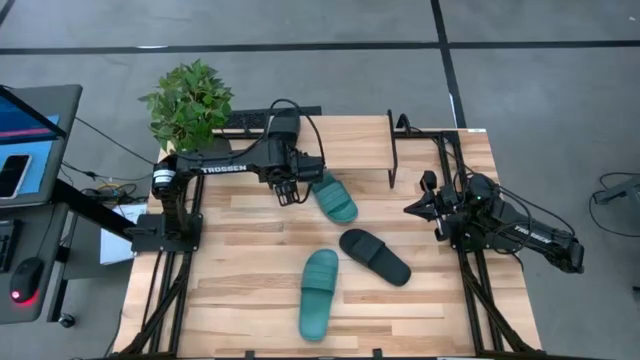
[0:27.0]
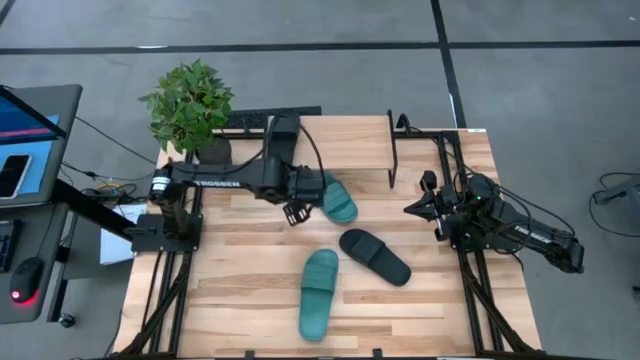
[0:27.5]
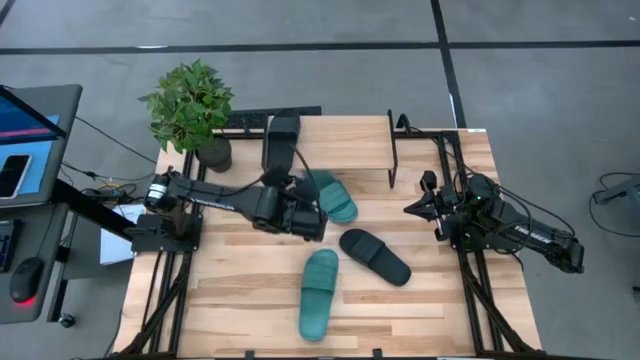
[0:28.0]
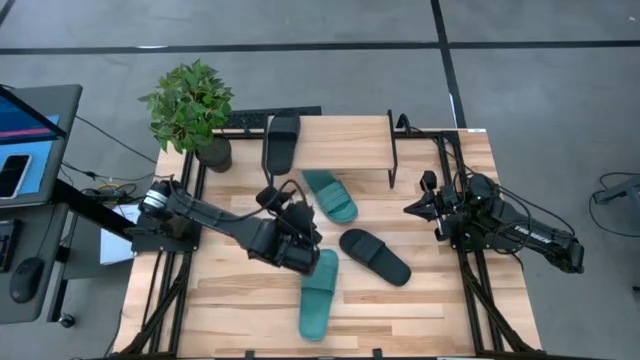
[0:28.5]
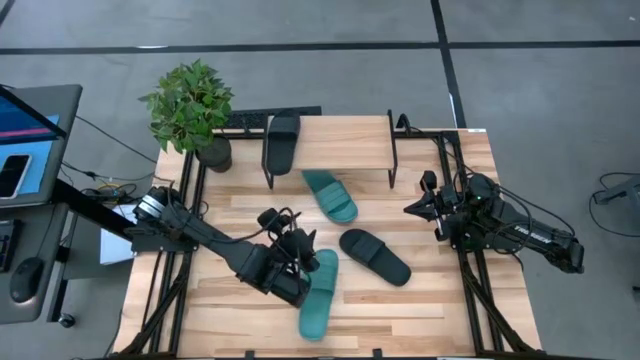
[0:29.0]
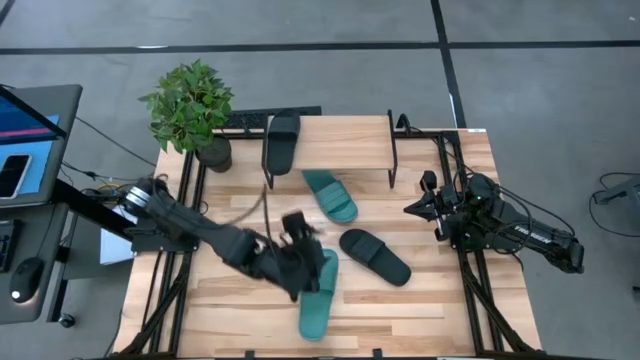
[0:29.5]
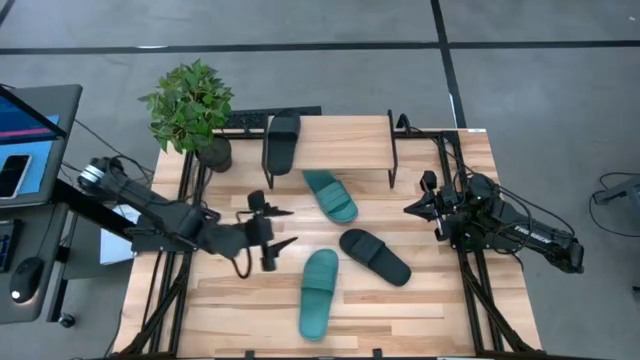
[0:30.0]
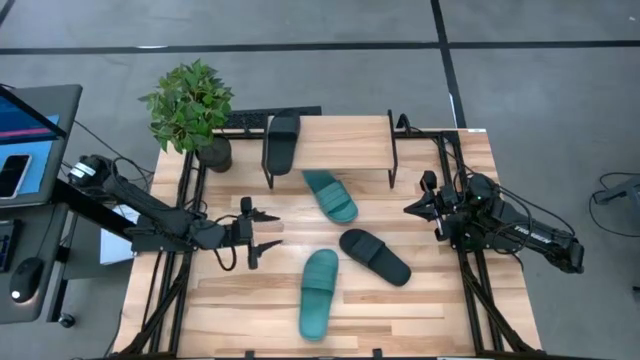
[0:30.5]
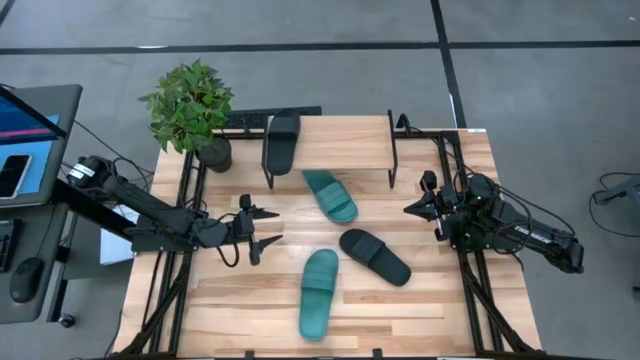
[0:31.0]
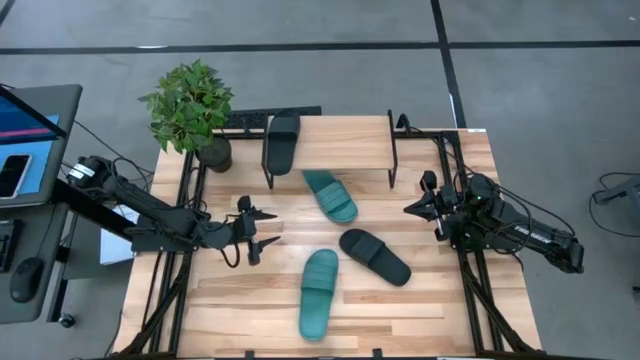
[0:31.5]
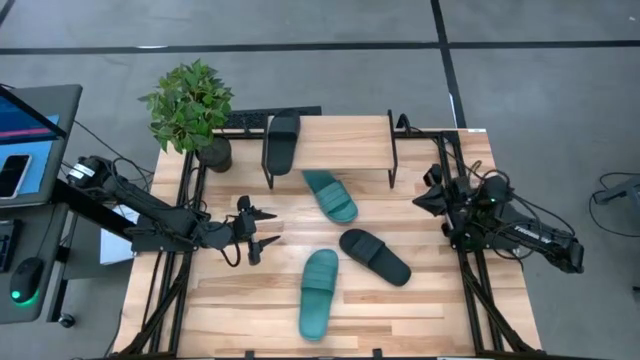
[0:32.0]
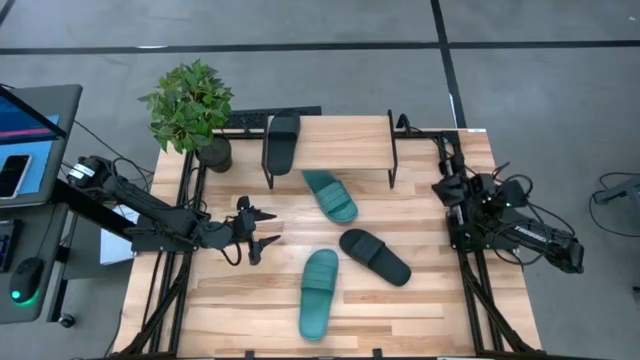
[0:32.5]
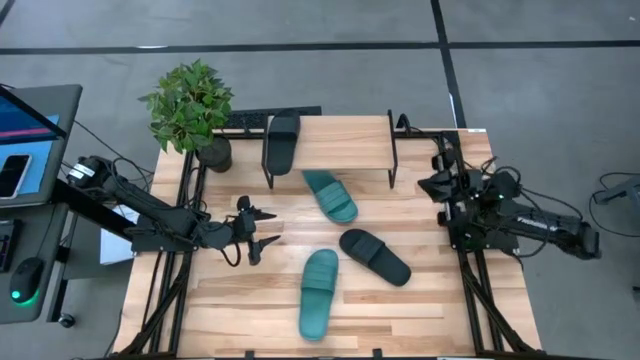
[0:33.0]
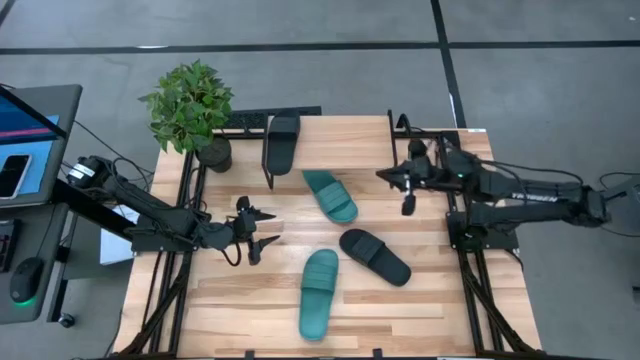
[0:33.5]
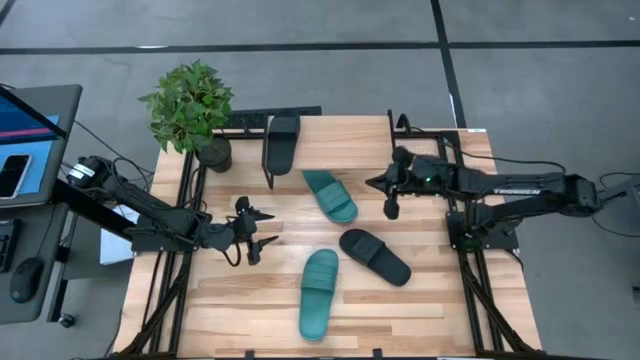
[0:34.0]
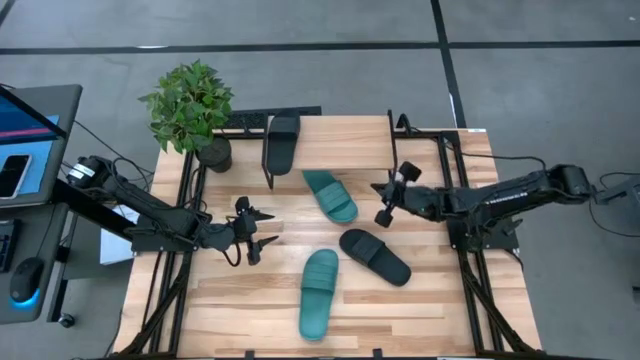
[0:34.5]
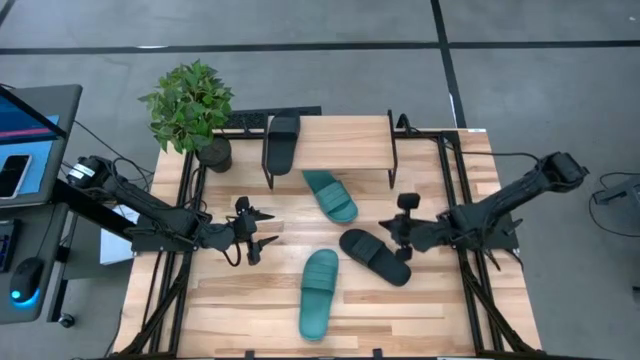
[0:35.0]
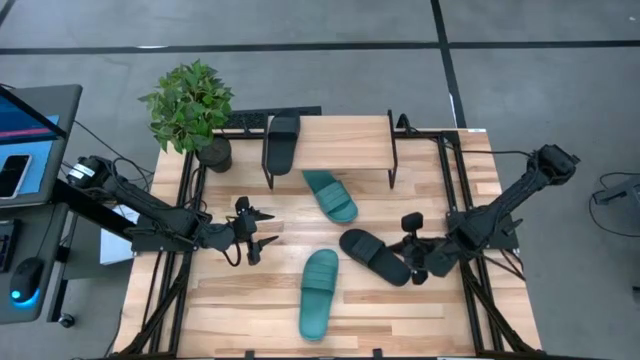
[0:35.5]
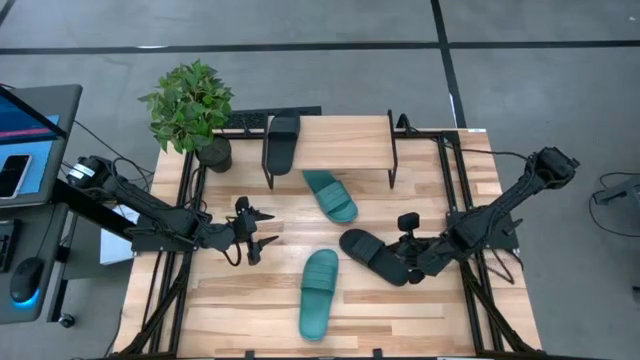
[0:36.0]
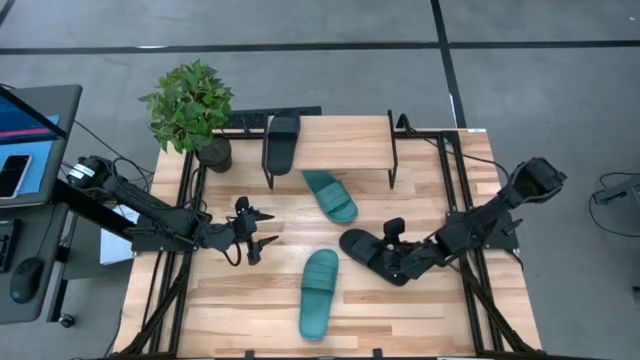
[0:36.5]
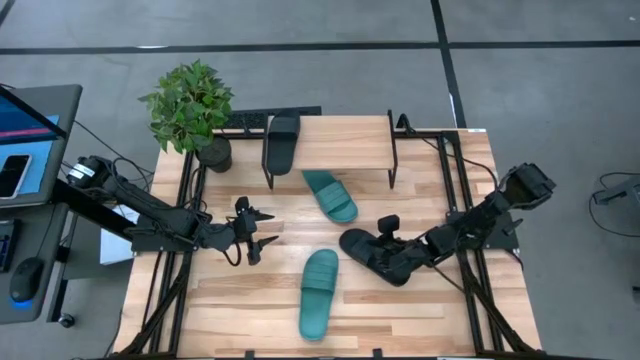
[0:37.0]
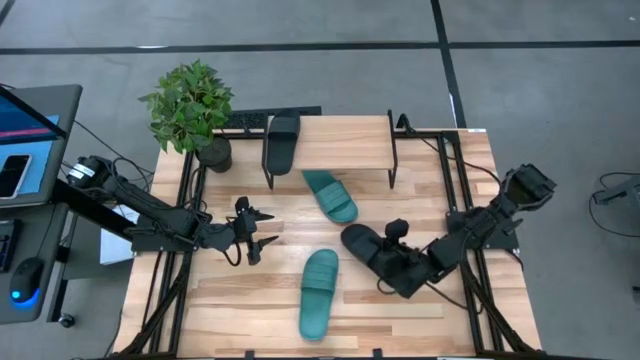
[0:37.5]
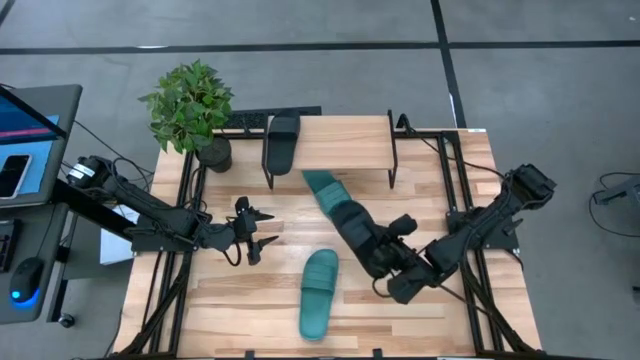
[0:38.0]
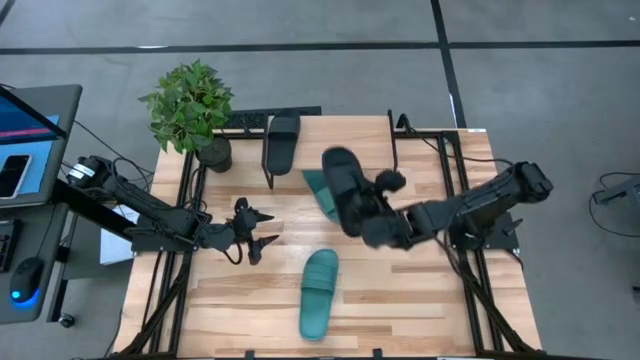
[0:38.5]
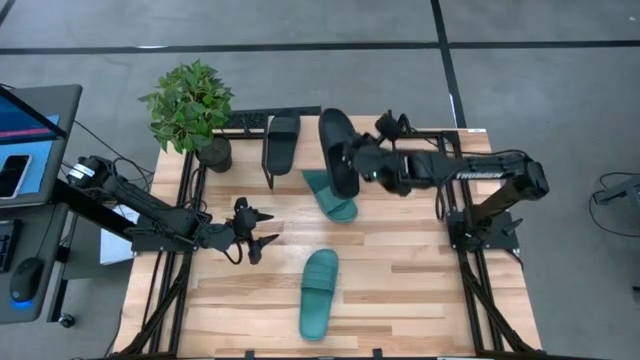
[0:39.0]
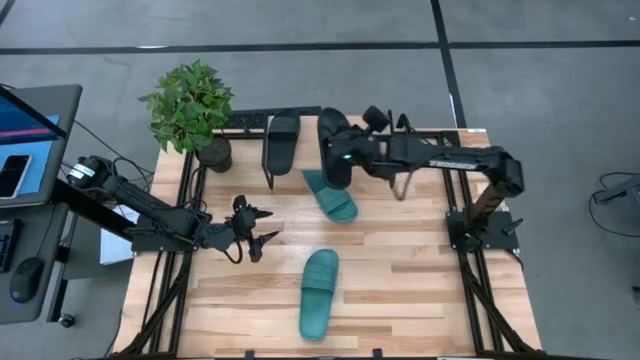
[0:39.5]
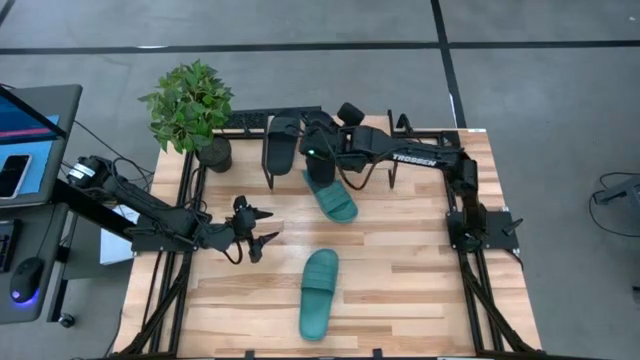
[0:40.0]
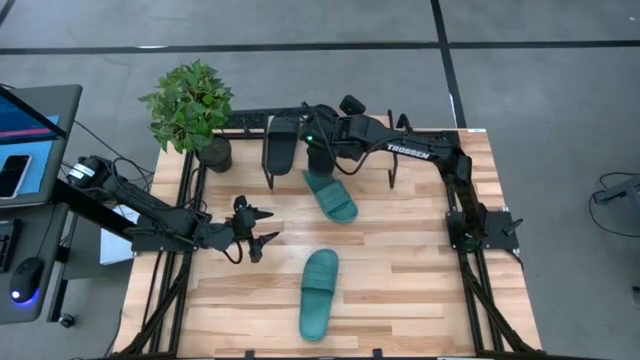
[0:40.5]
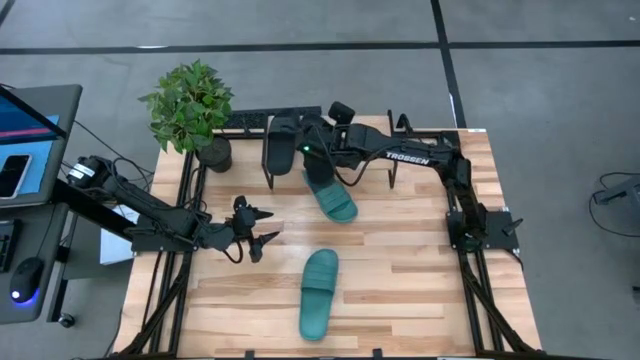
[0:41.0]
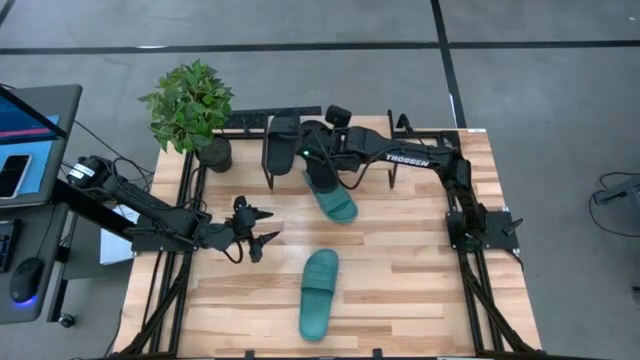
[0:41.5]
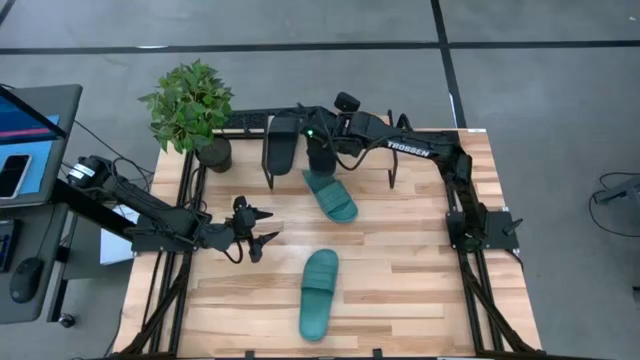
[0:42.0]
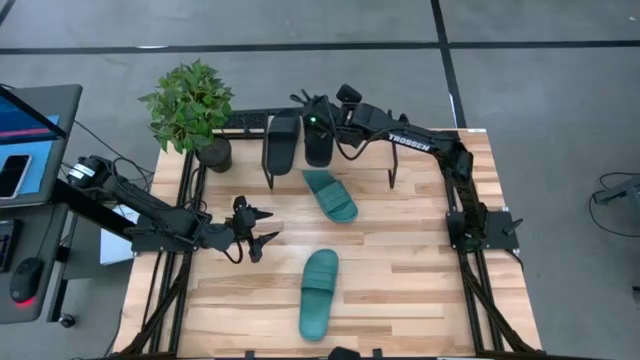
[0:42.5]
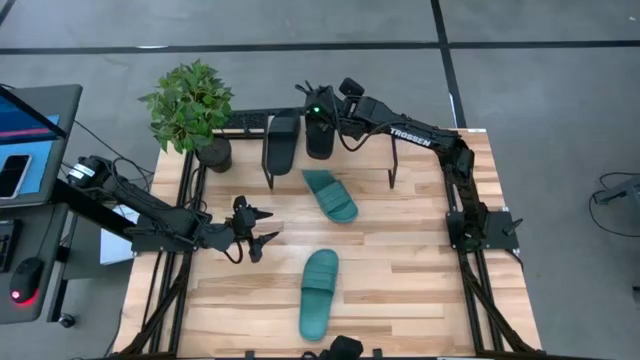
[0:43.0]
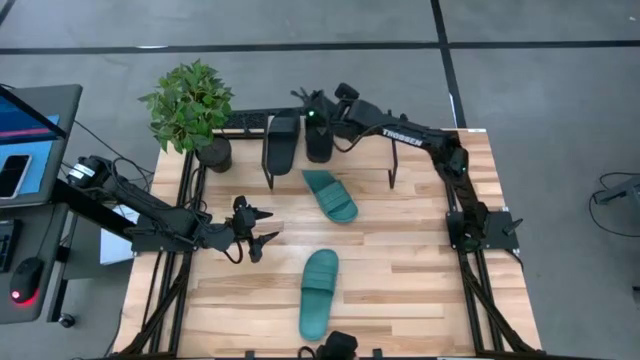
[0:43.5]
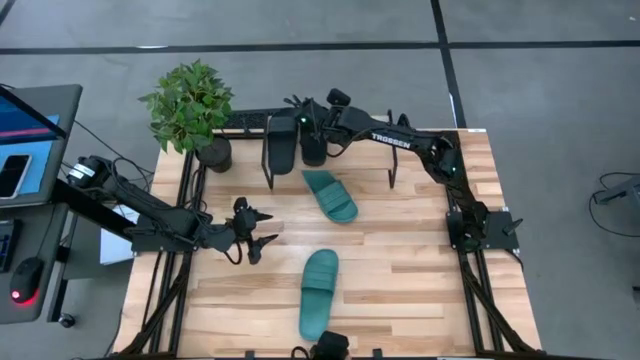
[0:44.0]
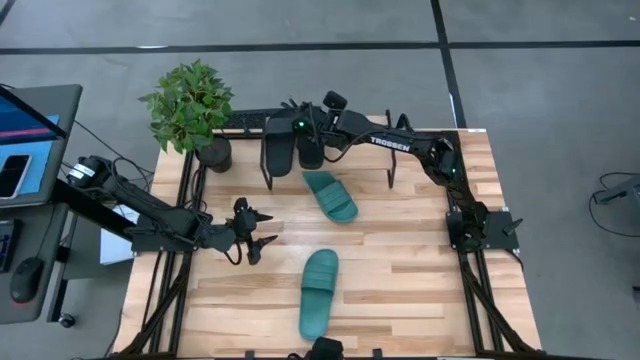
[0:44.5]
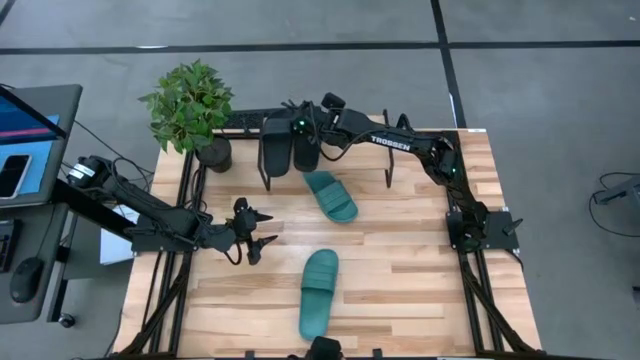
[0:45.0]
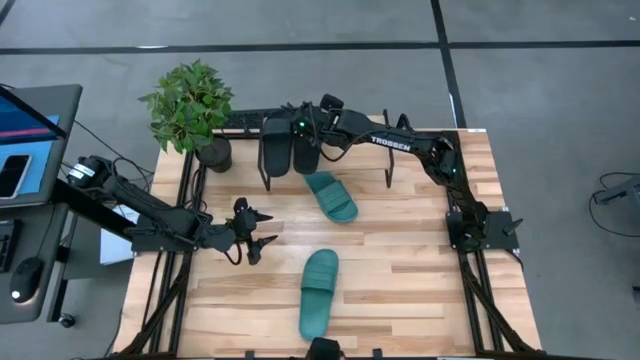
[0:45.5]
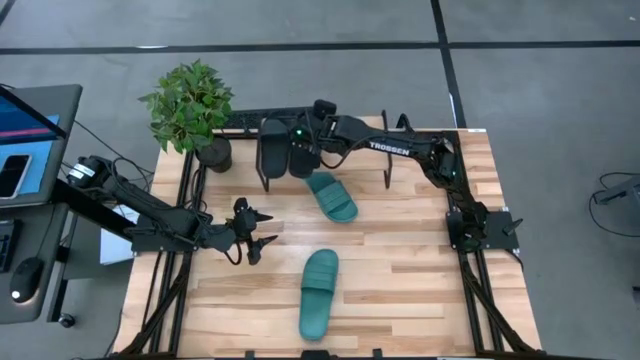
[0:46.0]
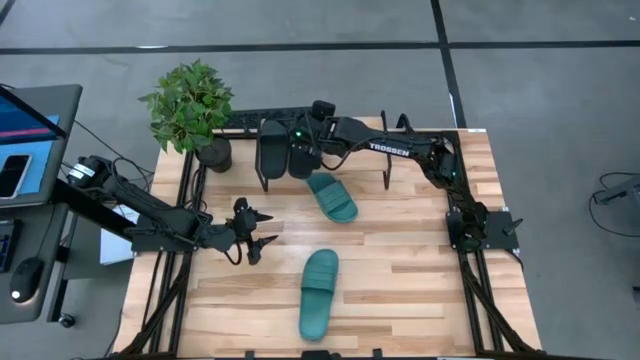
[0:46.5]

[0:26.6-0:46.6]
Task: Pick and place slides into the shelf
Put the black pair of slippers on the shelf
